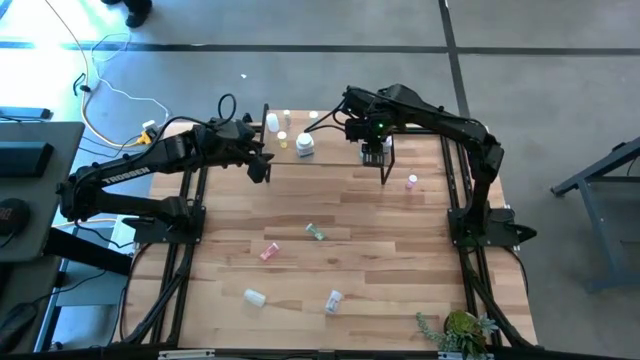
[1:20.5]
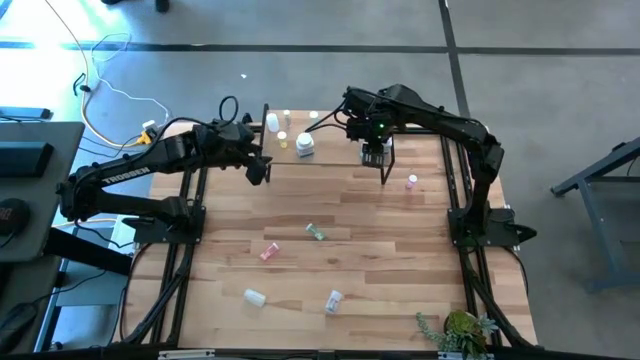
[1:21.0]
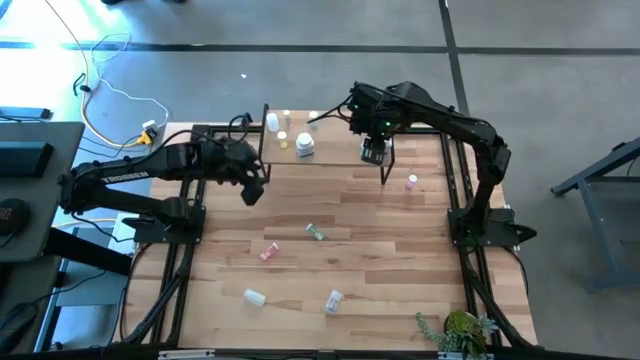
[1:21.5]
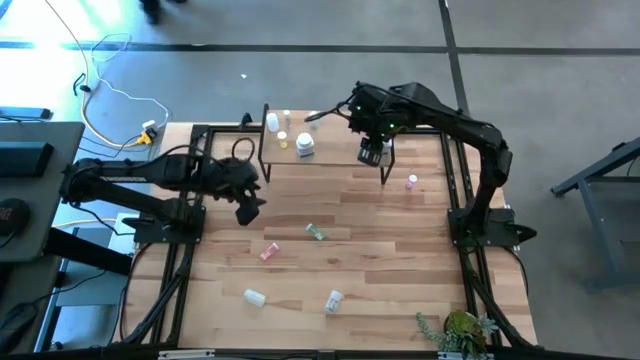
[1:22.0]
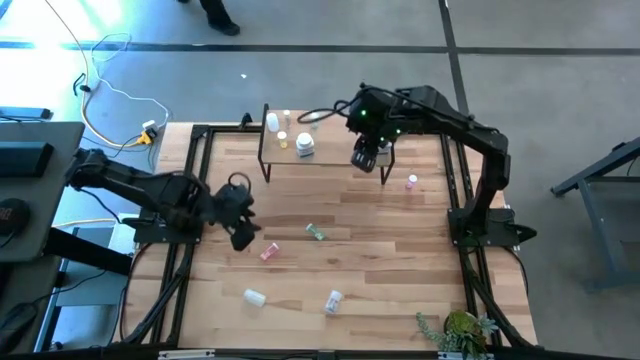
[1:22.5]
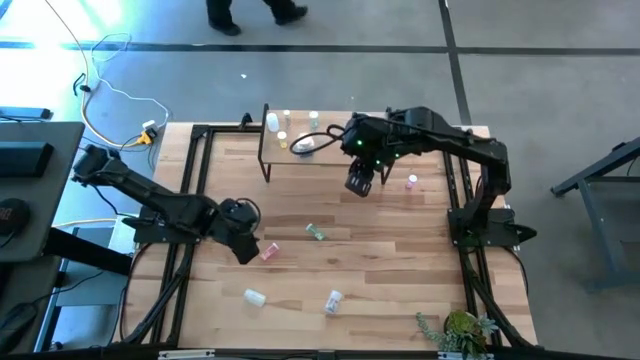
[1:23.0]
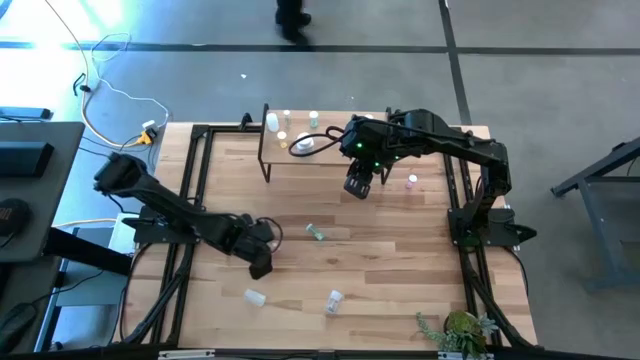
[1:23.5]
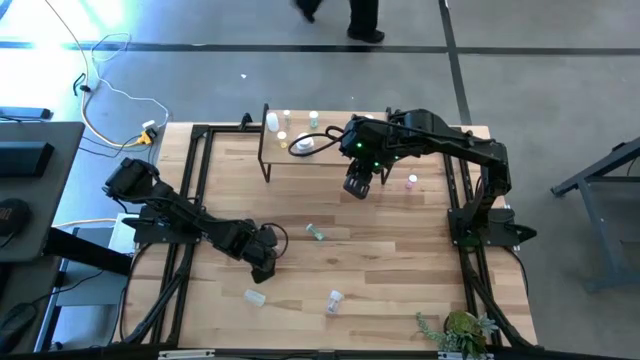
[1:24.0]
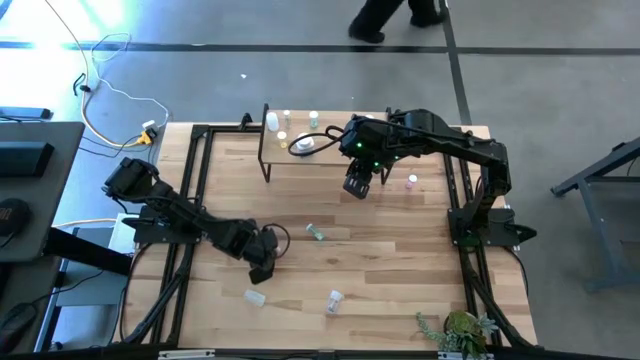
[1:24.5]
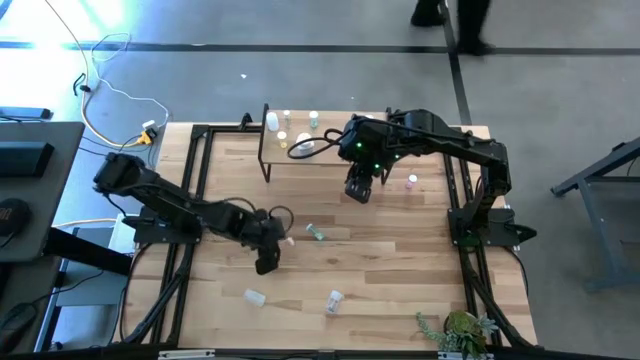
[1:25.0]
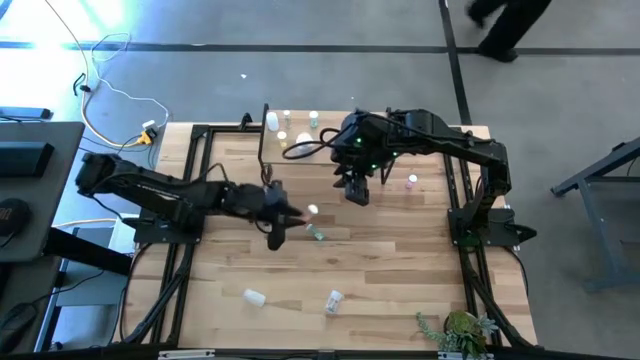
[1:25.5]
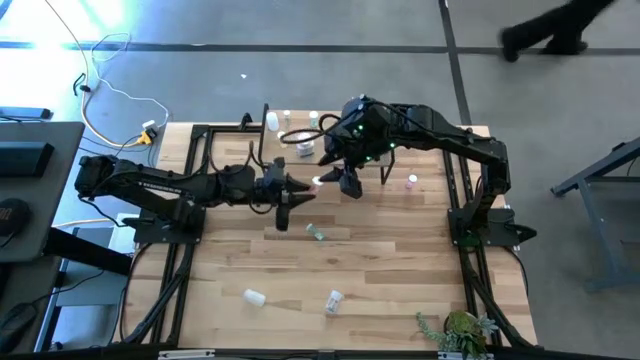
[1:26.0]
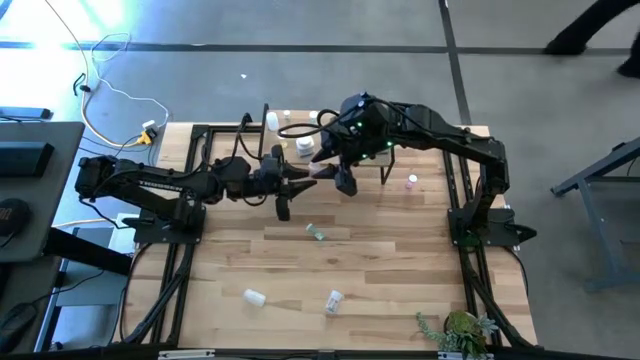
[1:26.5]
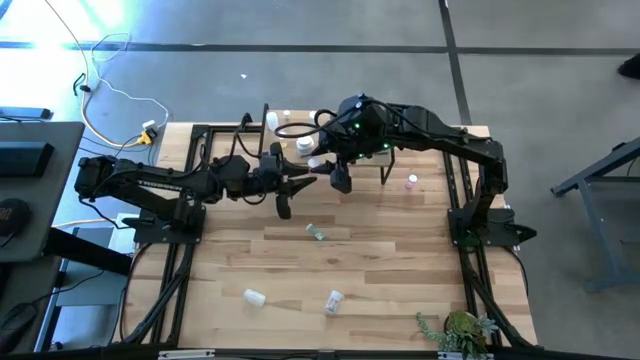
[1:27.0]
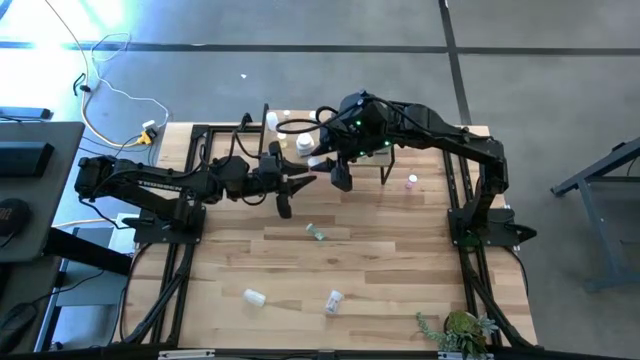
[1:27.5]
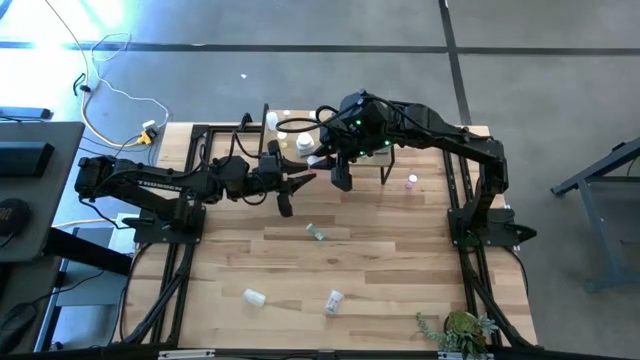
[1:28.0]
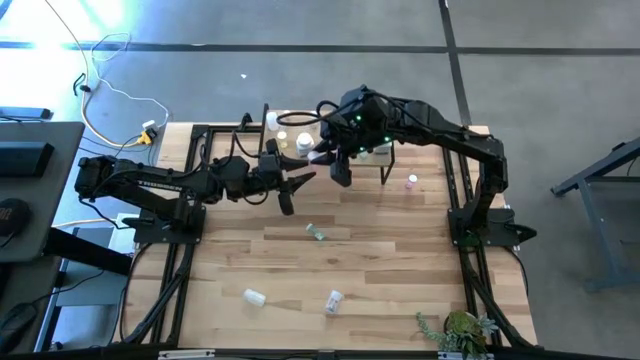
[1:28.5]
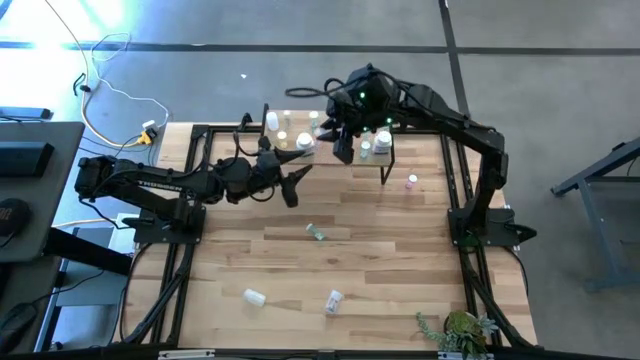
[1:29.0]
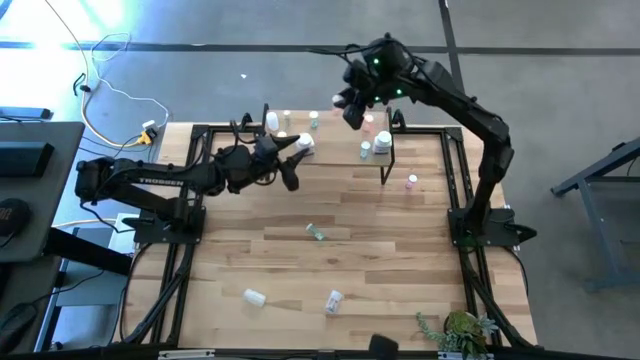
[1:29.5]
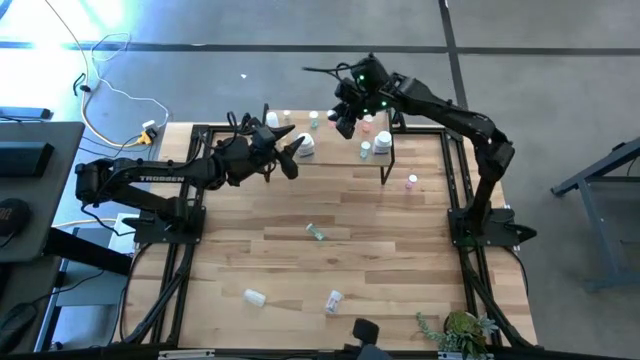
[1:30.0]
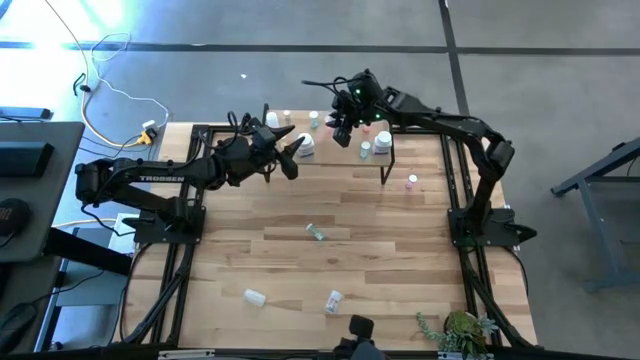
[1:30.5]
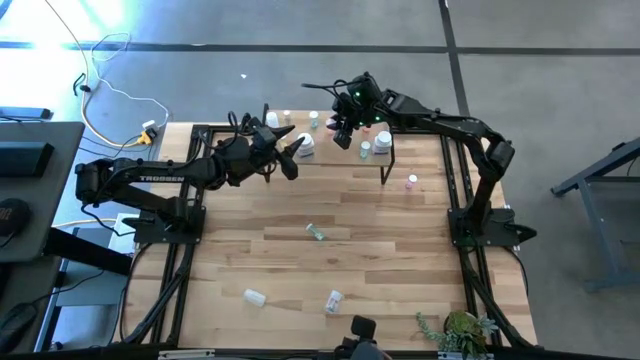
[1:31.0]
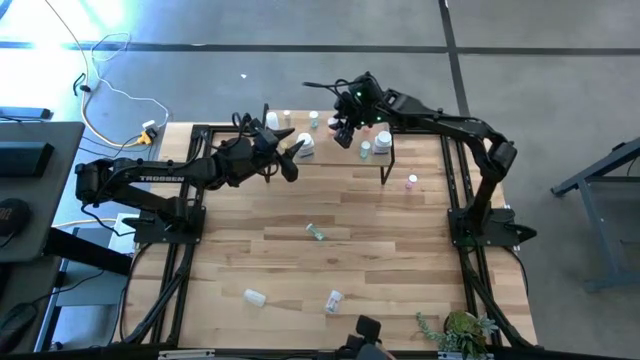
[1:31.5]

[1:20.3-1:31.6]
Task: Pick and place medicine bottles onto shelf by color
Put the pink pill bottle on the shelf

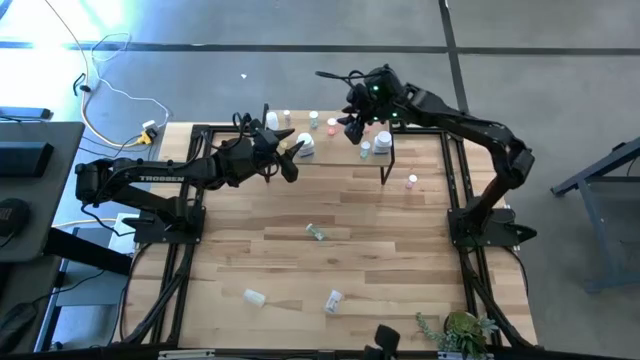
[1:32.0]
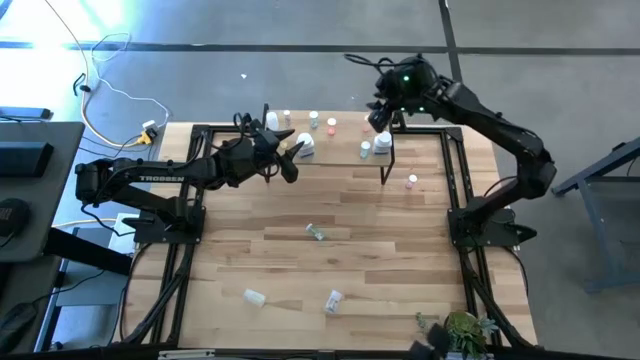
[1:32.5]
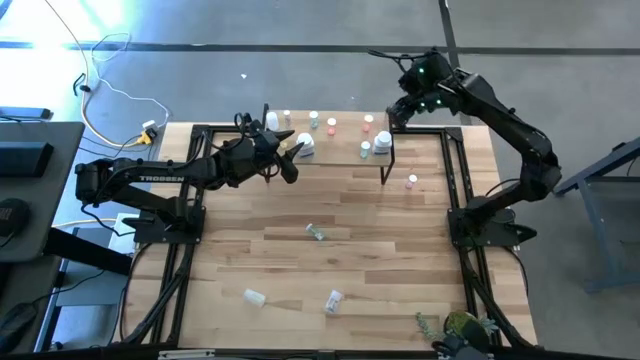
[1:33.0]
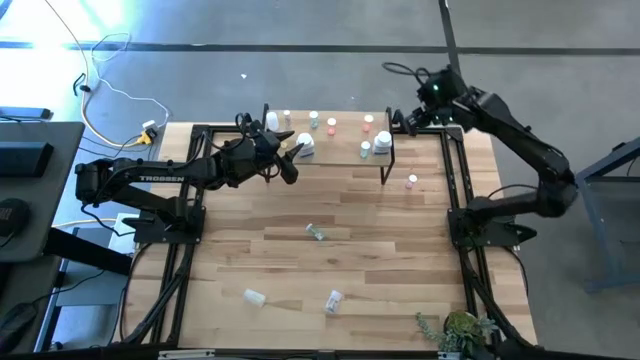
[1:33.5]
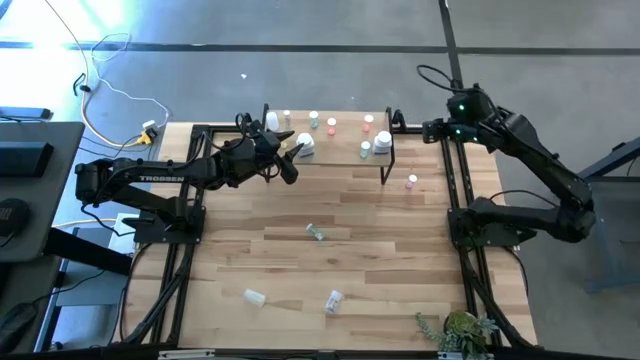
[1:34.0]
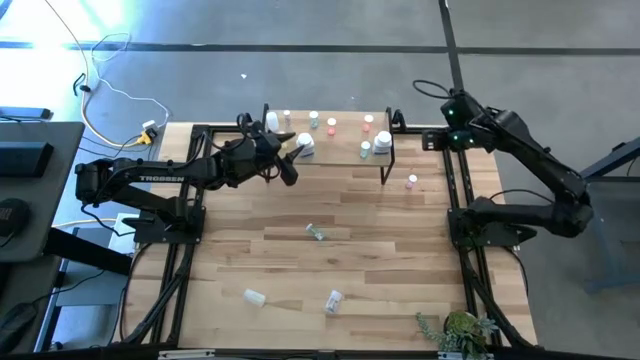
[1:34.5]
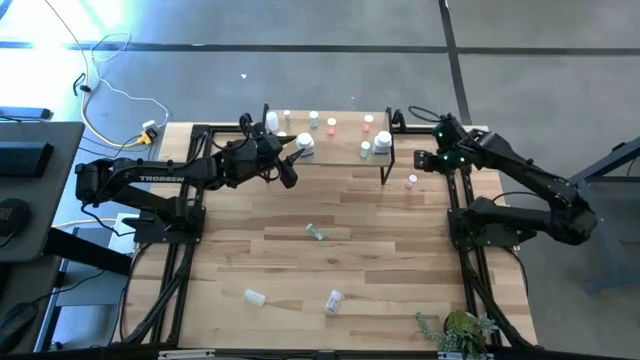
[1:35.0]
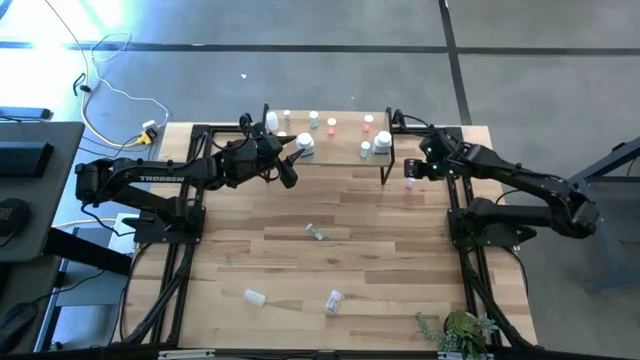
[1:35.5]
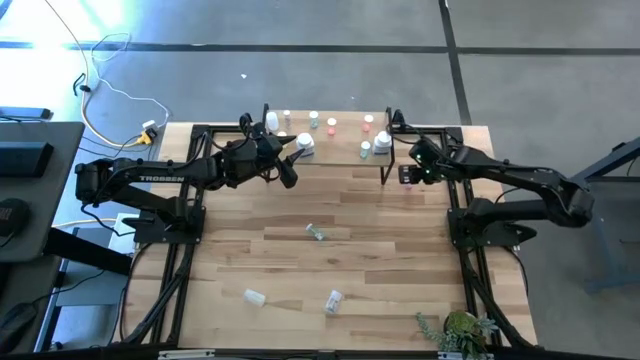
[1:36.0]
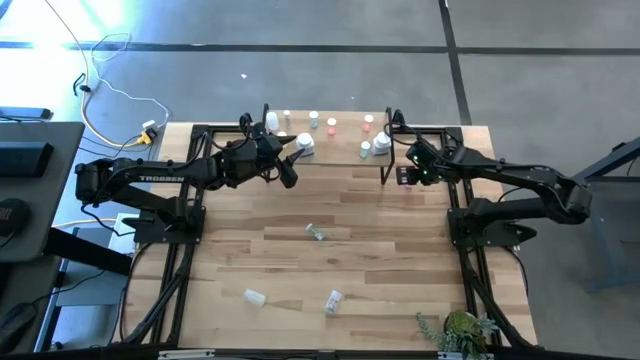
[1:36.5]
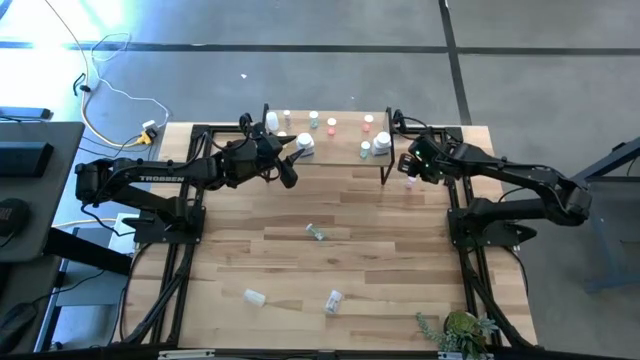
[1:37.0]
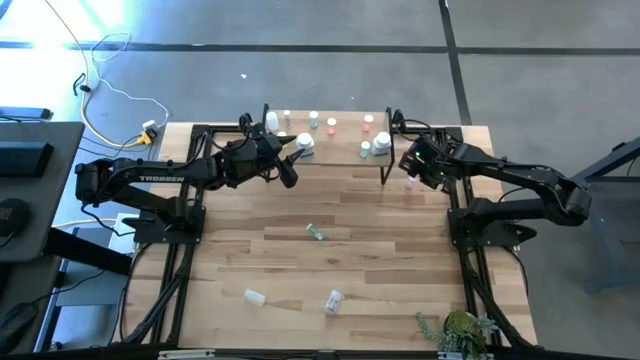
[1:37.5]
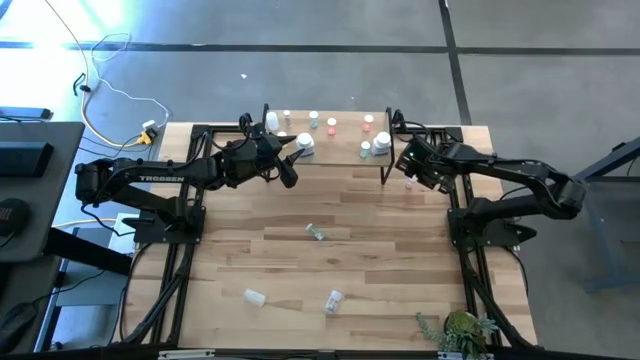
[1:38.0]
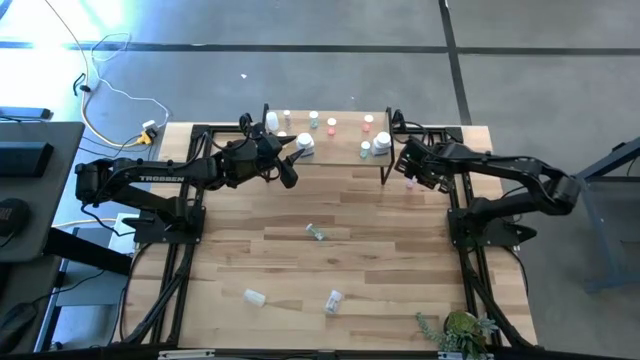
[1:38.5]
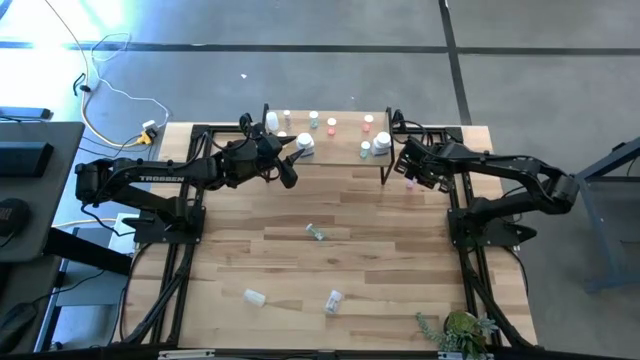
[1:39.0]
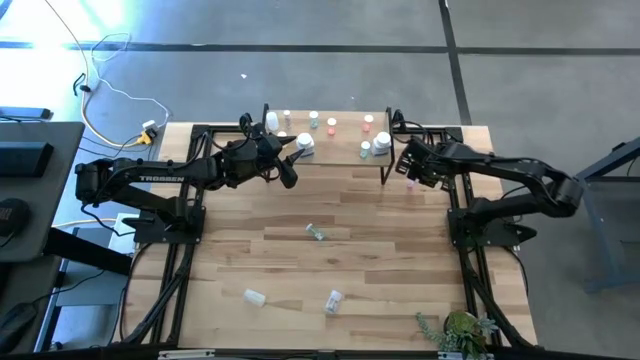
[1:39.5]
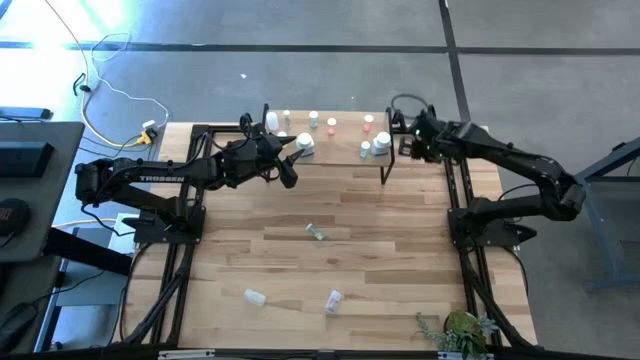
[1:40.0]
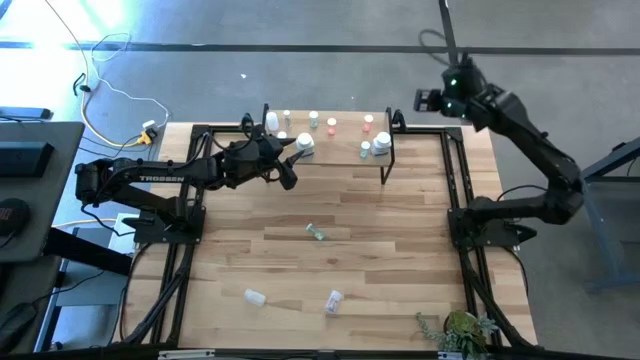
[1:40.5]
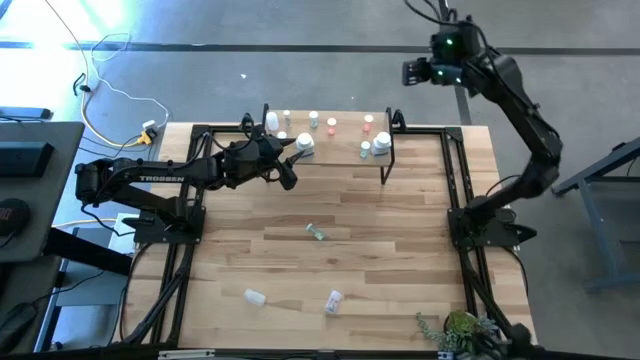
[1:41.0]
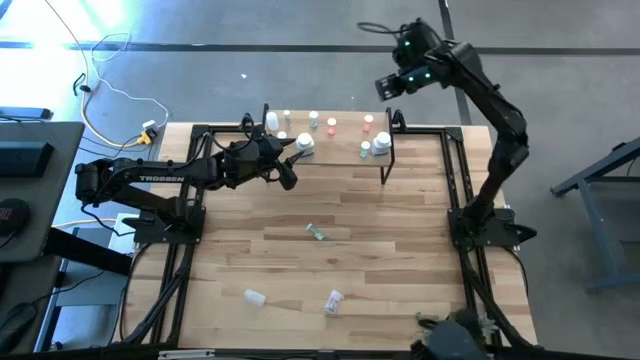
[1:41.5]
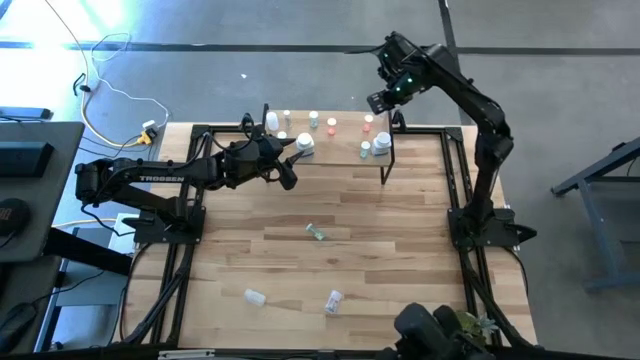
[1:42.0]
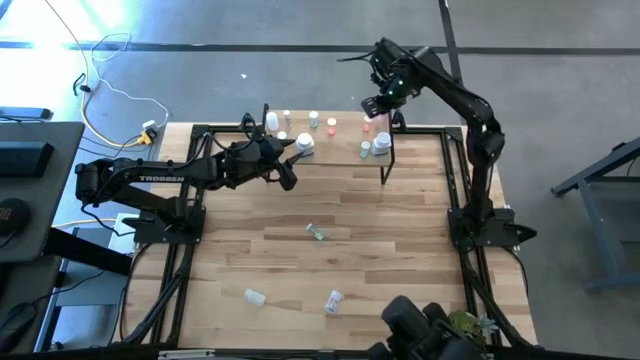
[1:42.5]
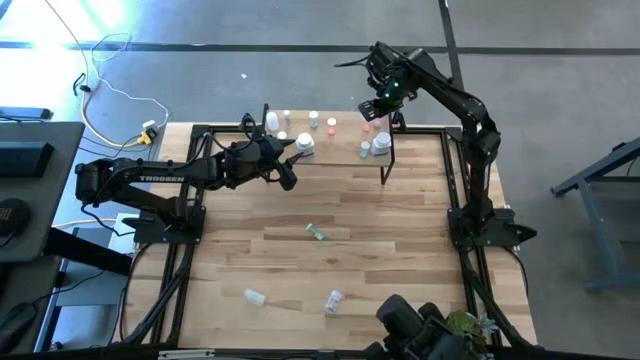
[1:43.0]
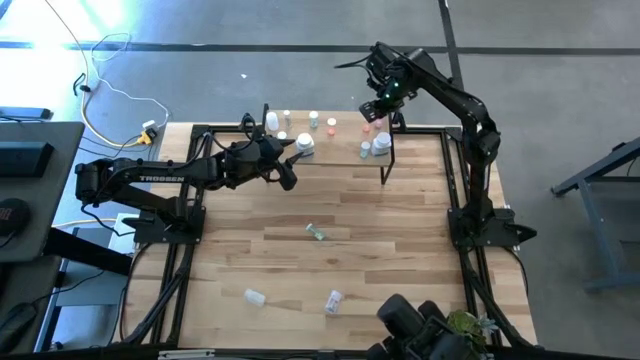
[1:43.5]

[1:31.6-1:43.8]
Put the purple pill bottle on the shelf
